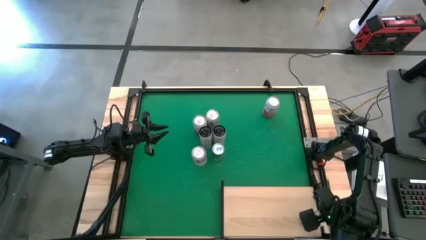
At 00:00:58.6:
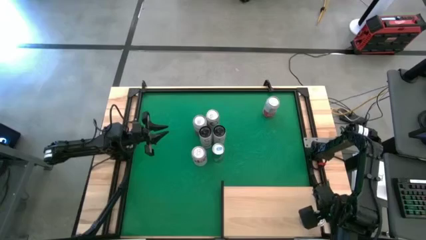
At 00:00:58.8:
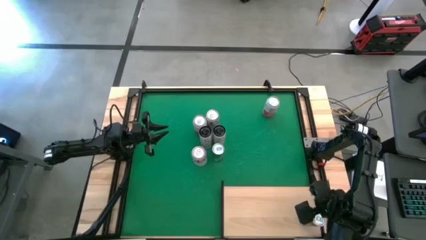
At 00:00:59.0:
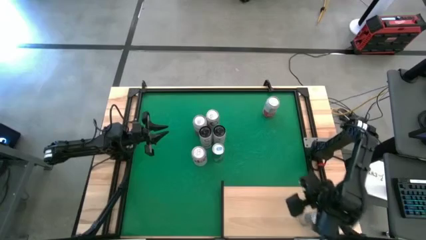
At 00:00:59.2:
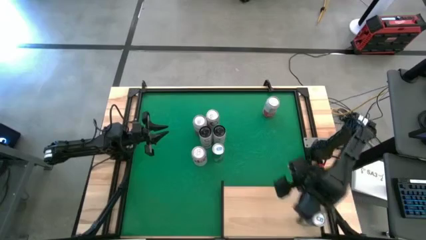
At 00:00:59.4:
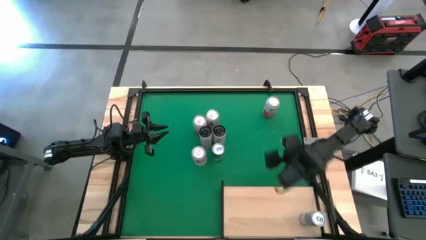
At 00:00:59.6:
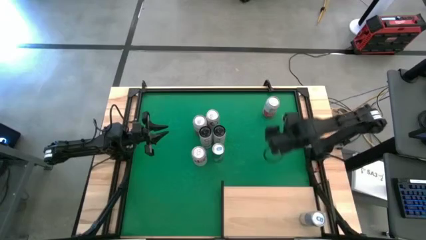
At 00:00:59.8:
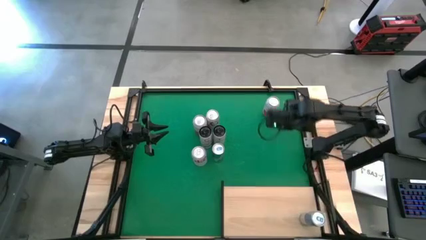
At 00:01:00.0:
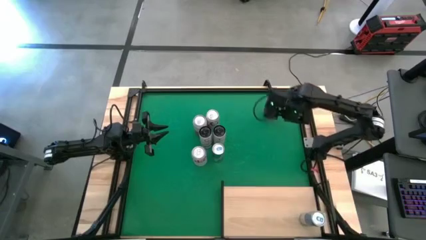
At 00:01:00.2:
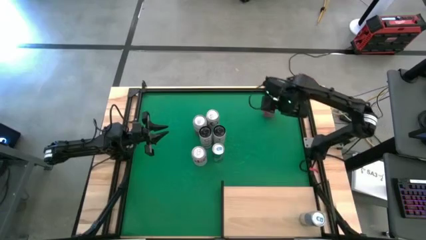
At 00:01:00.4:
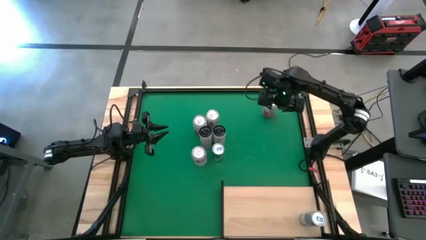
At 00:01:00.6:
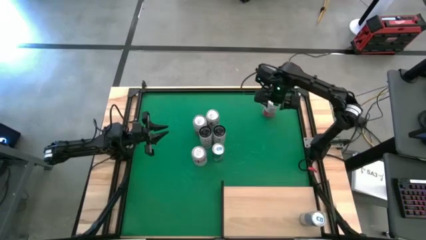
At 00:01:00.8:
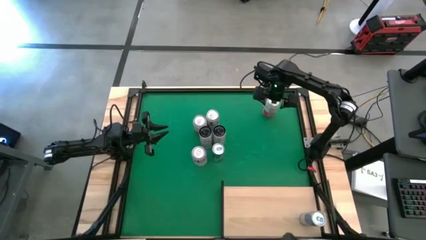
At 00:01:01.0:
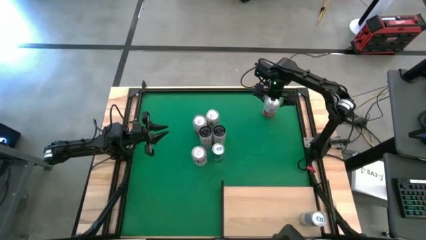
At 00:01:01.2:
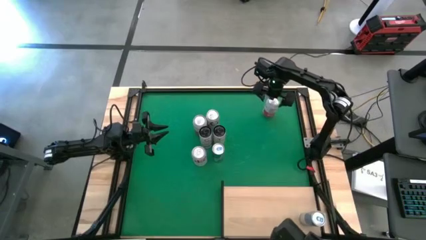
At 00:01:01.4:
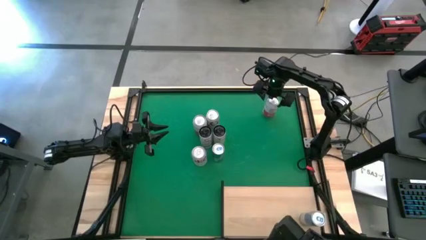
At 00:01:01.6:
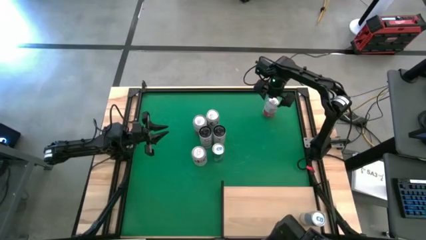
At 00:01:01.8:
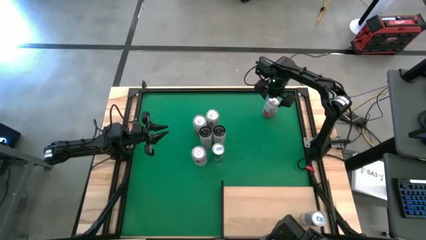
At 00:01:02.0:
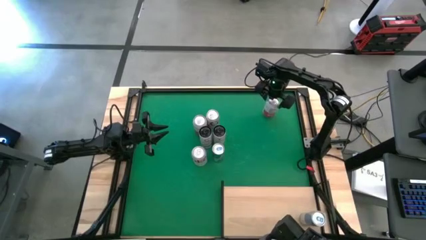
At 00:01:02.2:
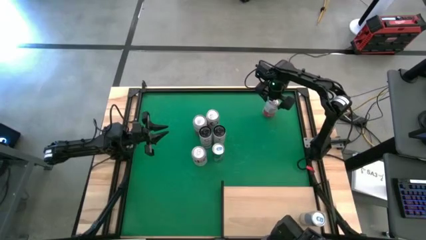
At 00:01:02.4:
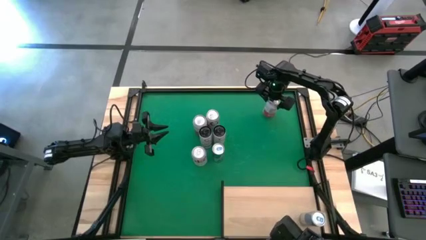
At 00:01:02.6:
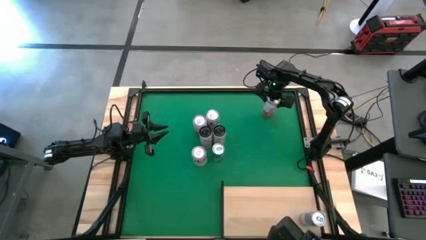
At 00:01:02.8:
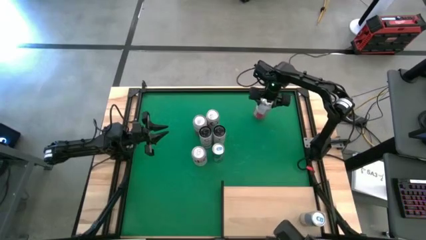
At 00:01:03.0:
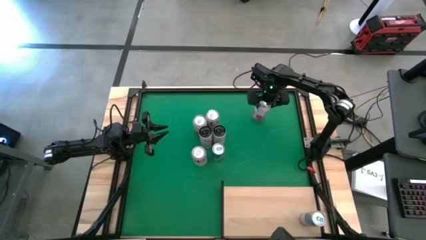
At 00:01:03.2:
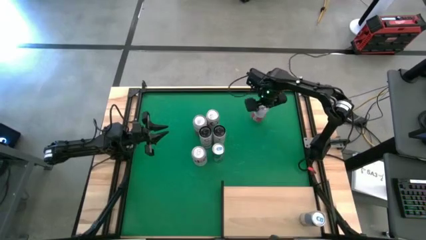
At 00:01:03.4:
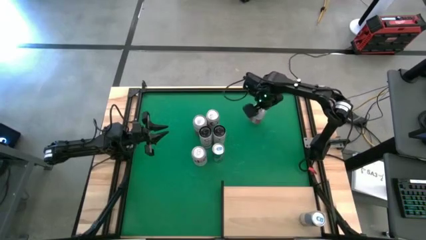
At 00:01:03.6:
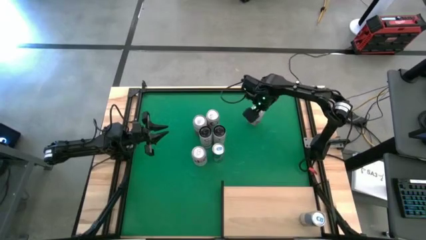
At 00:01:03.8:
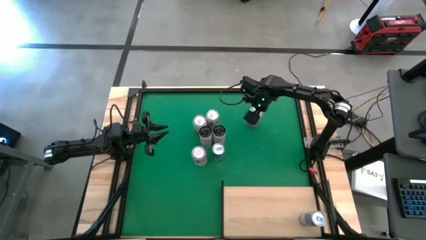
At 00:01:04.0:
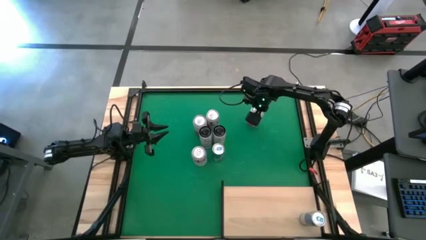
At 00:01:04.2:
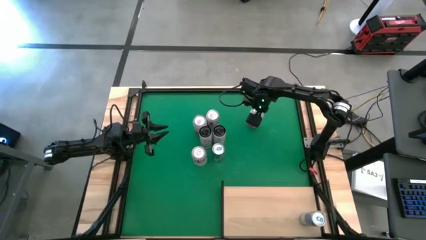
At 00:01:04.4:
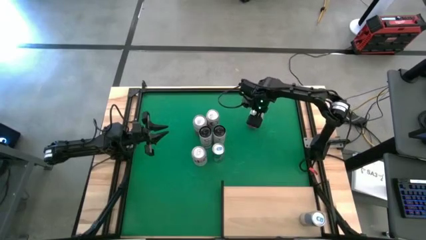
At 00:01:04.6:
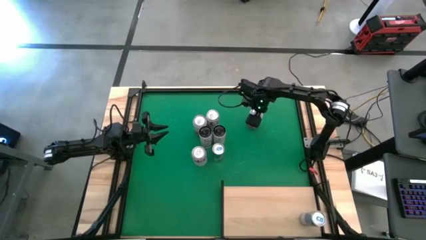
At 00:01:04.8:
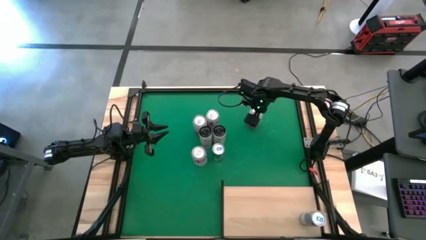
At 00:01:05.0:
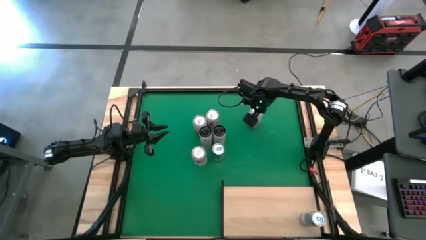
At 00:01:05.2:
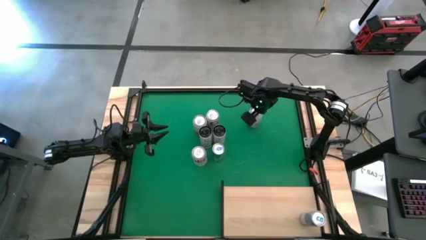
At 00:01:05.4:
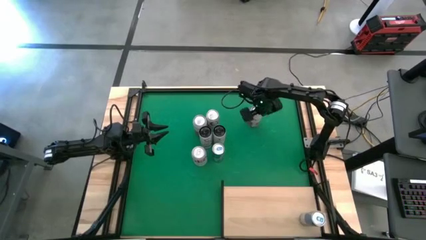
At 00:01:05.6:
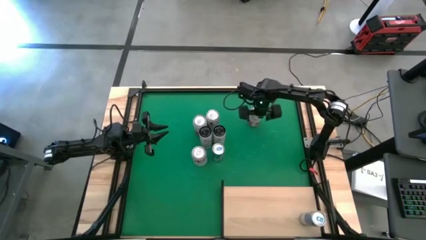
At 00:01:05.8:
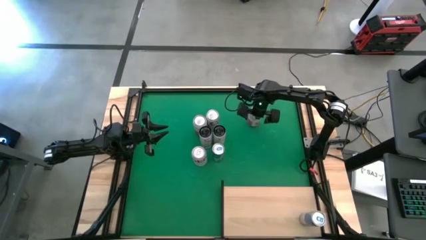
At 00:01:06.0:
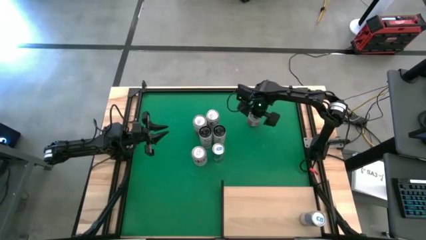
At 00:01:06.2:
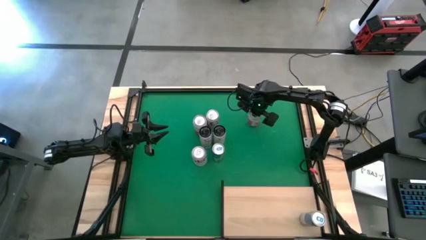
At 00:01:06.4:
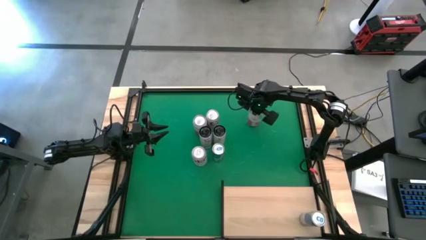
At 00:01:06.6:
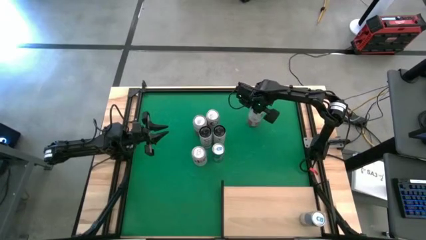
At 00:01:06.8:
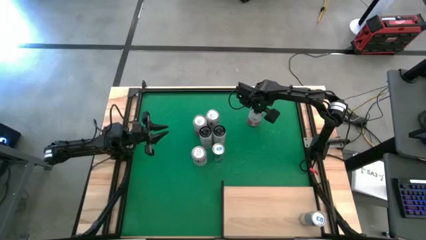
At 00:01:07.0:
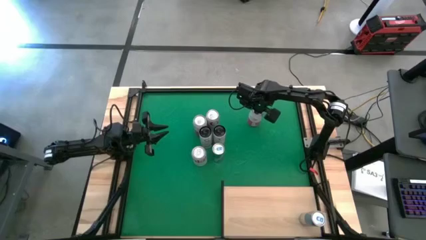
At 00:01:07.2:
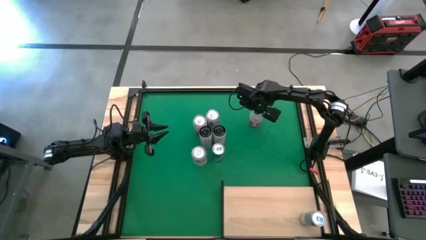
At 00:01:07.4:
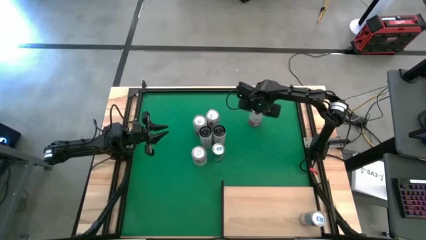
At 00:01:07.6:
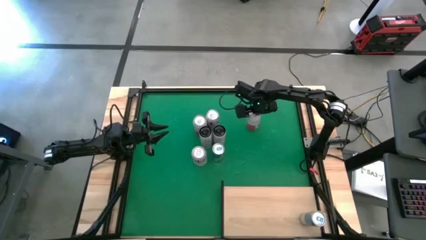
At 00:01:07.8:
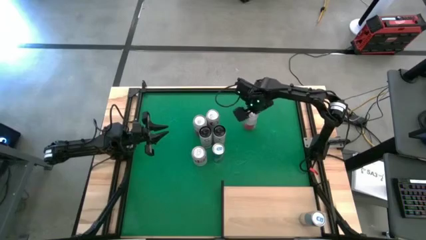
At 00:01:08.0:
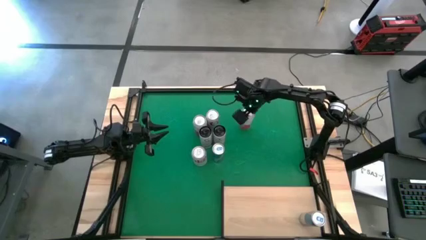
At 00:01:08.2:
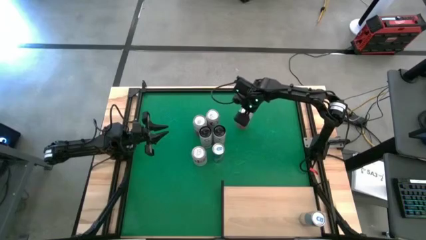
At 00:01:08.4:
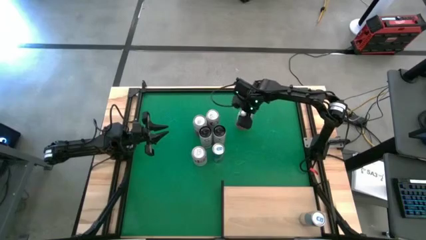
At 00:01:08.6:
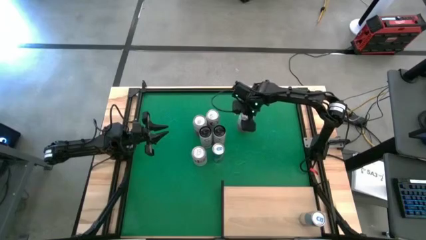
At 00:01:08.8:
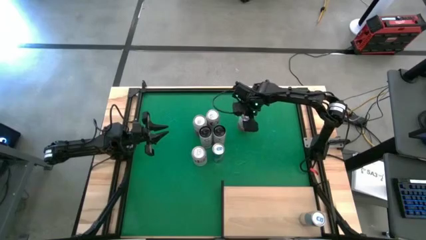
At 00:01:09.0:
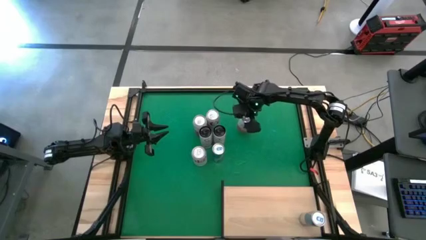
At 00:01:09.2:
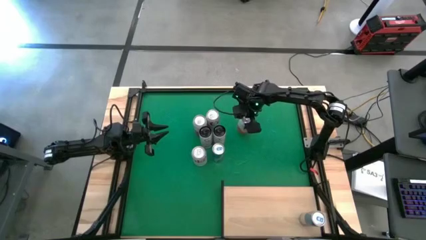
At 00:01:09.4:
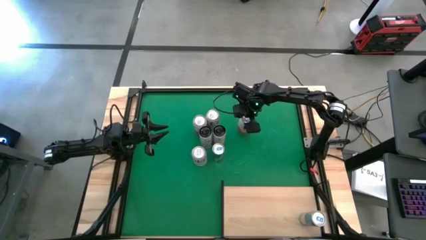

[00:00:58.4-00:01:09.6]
Task: Place canned beverage on shelf
Put the right pink white soda can on the shelf

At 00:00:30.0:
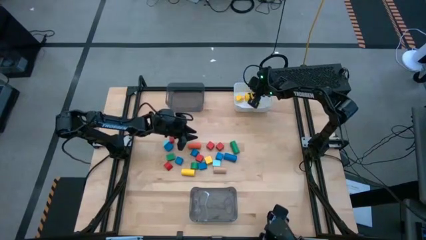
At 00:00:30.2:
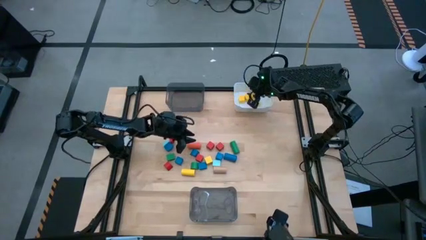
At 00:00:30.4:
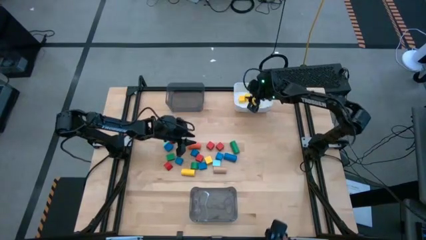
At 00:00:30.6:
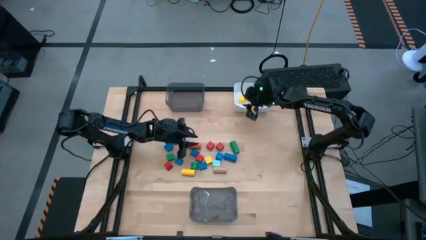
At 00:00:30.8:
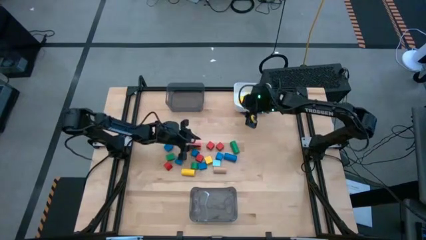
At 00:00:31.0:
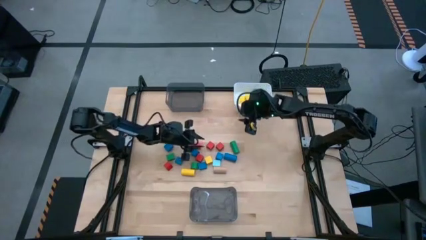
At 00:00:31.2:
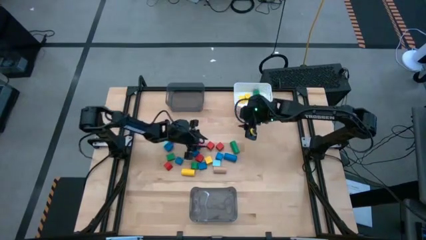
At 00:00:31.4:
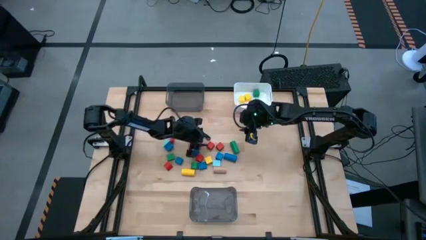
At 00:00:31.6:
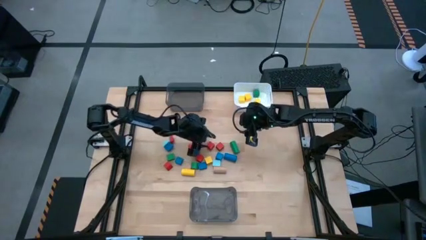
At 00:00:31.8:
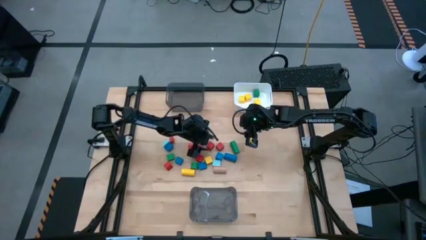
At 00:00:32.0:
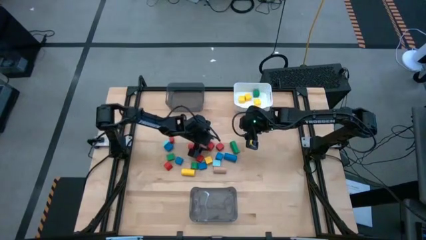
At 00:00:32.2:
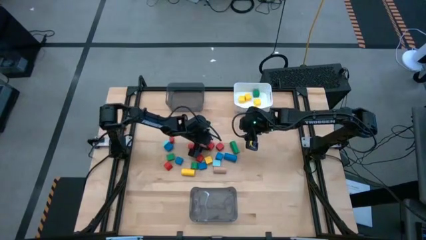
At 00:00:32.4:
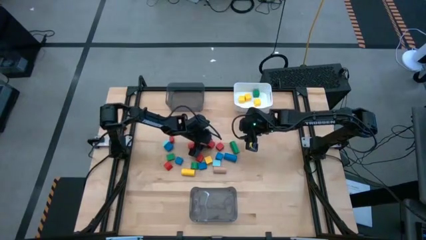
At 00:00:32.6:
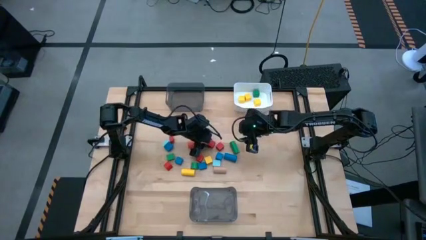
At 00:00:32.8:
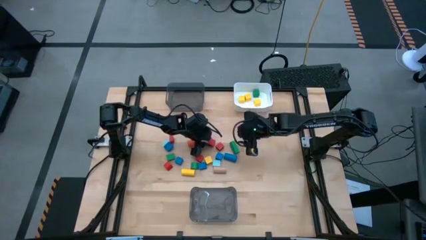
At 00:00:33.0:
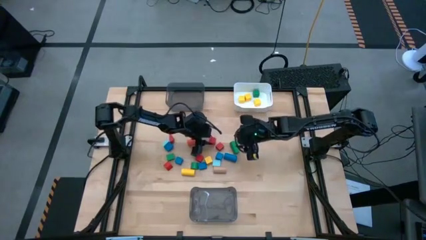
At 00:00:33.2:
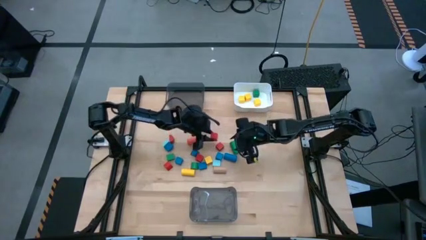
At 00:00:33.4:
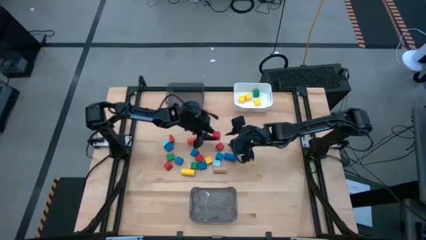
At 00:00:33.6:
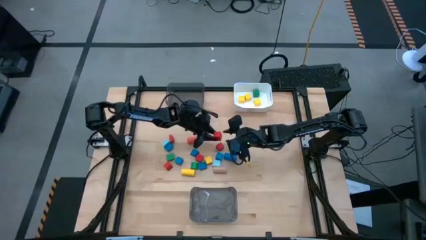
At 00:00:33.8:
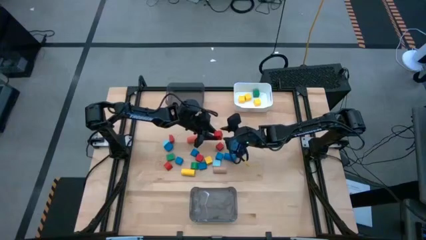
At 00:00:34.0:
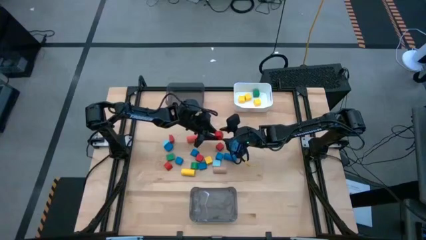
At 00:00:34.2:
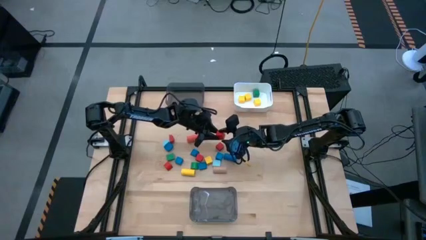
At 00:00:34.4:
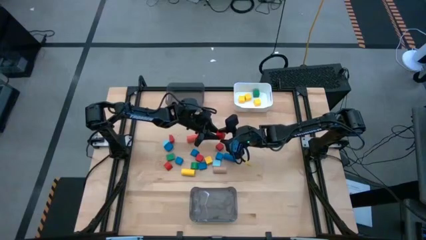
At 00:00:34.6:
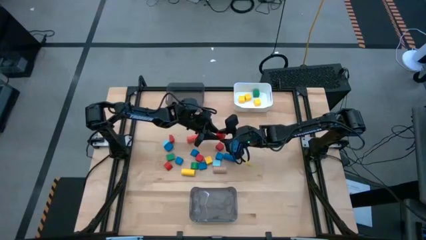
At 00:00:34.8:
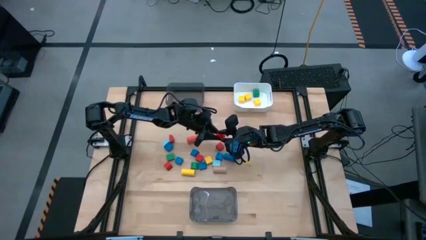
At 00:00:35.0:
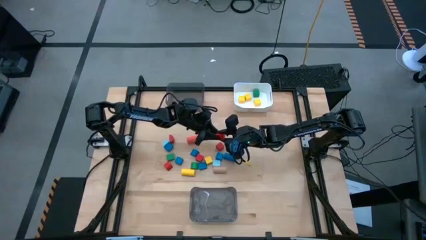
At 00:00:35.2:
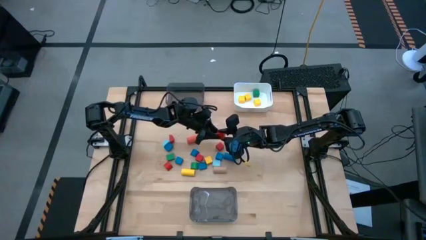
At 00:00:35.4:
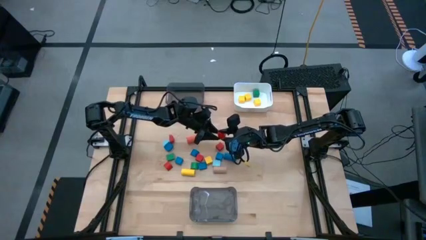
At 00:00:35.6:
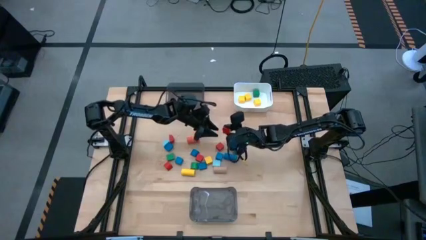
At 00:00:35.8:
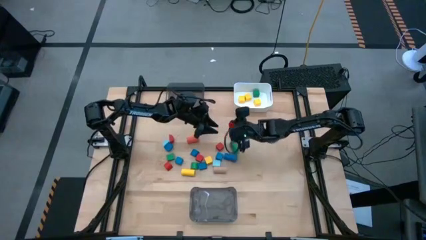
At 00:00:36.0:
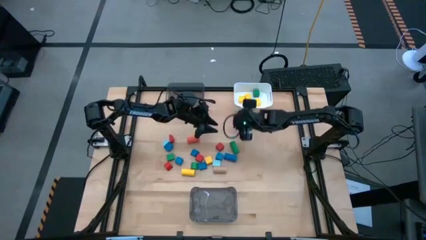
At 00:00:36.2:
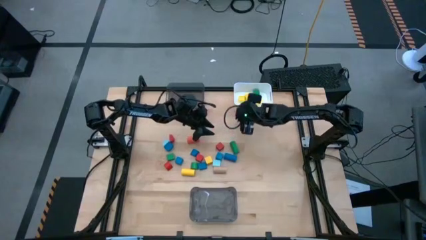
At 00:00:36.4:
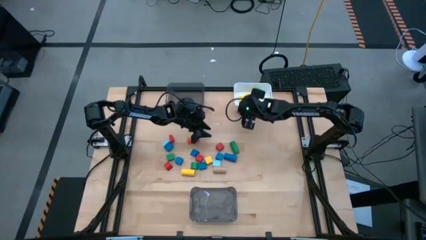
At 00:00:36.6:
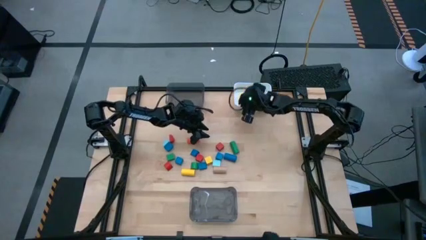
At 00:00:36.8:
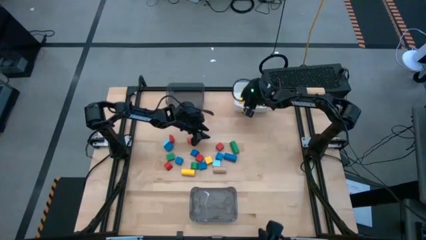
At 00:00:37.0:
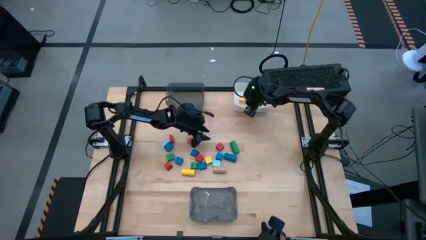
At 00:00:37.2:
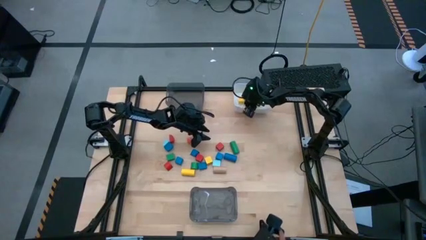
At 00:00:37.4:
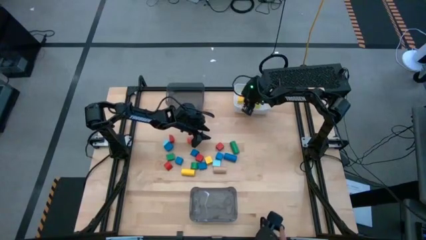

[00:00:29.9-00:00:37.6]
Task: Sort blocks by size
Put the red square block into the white bin
